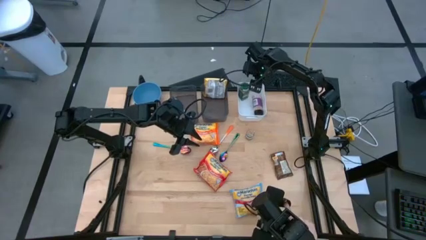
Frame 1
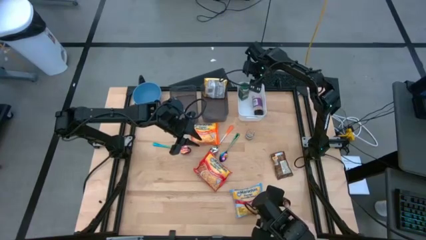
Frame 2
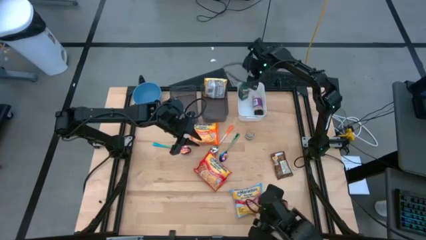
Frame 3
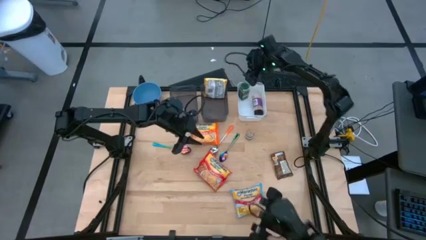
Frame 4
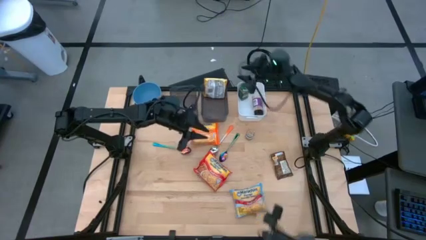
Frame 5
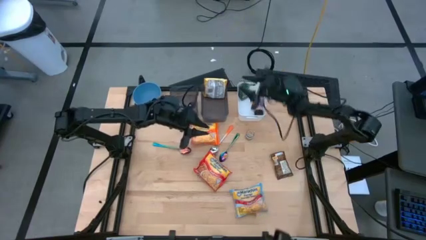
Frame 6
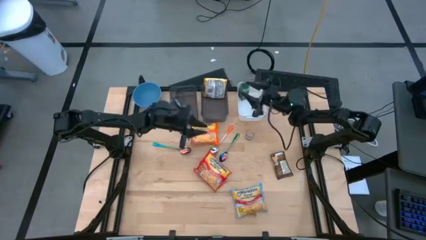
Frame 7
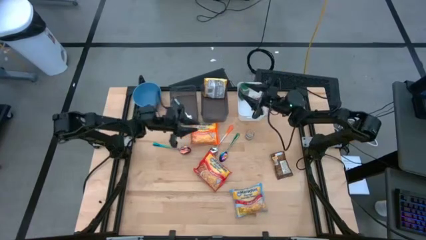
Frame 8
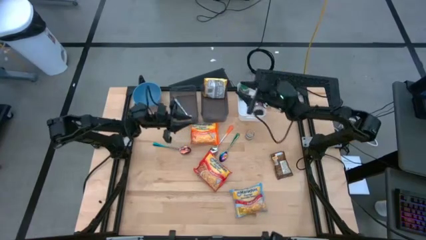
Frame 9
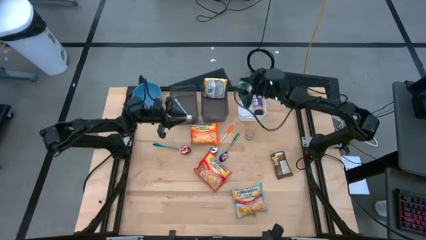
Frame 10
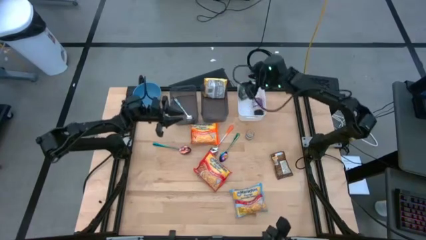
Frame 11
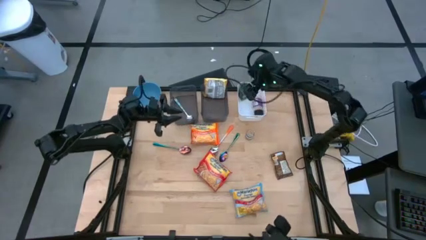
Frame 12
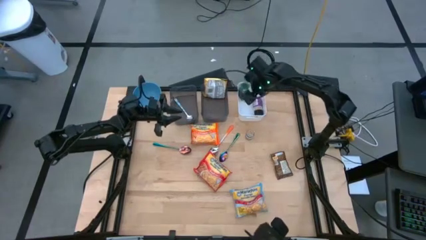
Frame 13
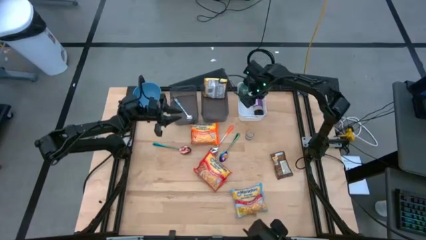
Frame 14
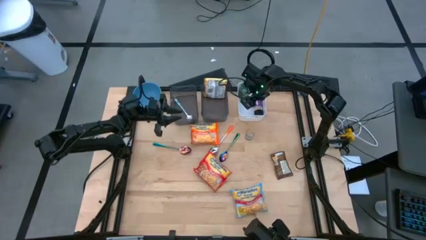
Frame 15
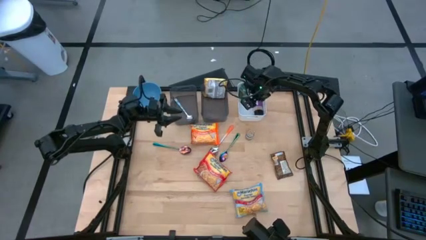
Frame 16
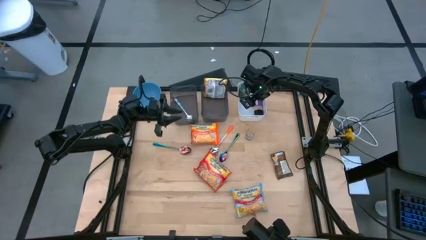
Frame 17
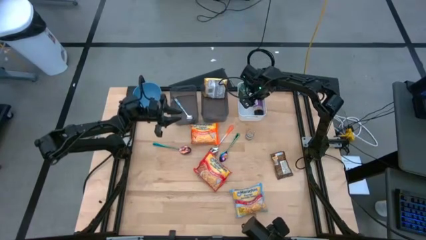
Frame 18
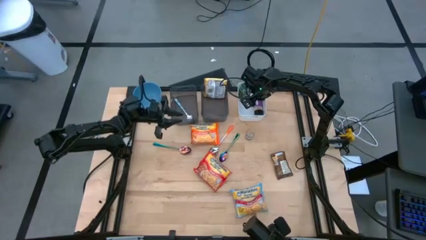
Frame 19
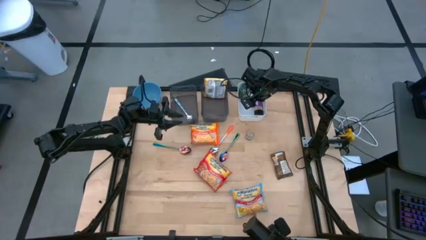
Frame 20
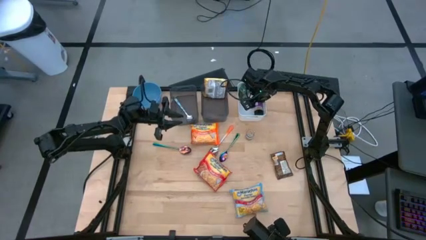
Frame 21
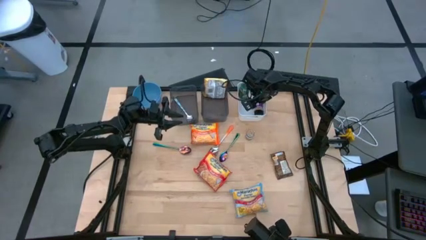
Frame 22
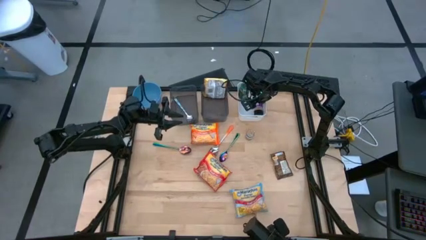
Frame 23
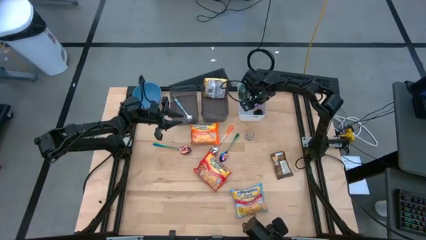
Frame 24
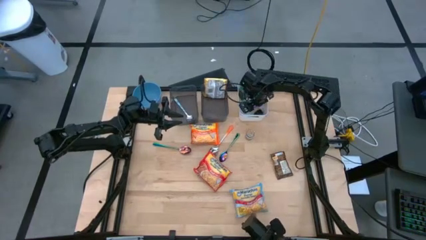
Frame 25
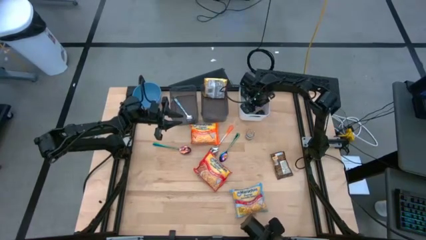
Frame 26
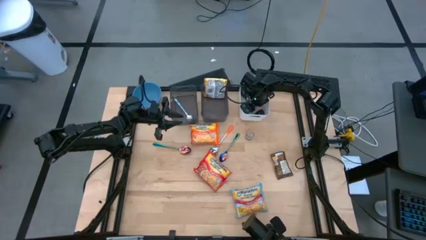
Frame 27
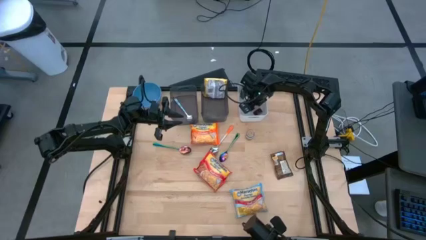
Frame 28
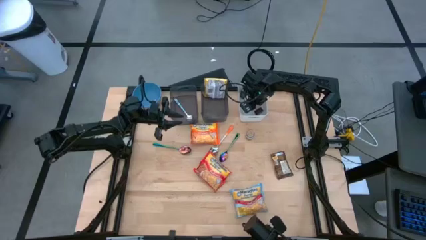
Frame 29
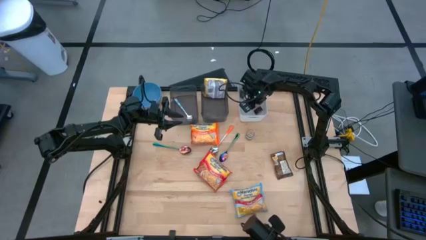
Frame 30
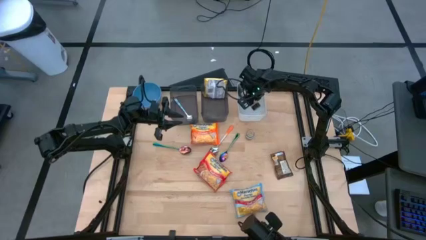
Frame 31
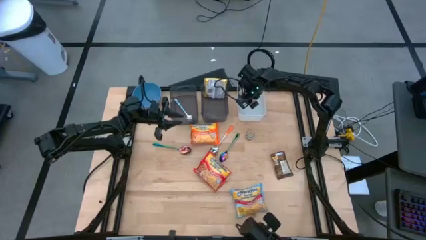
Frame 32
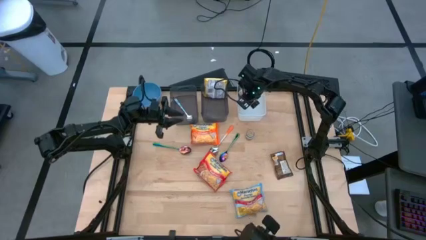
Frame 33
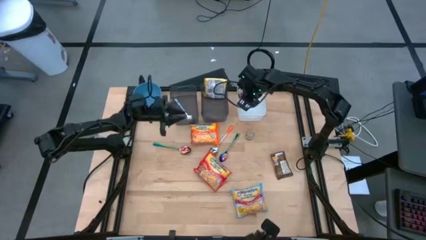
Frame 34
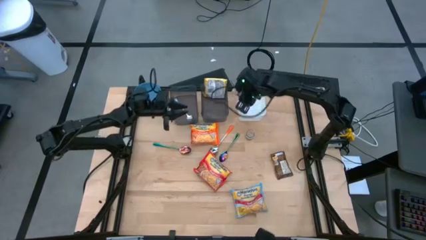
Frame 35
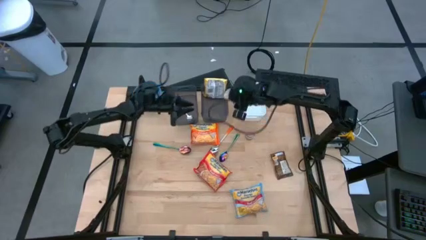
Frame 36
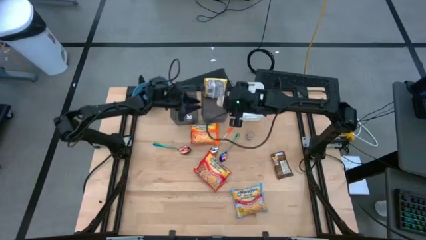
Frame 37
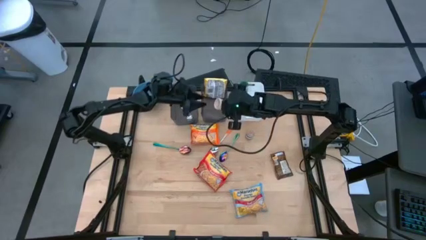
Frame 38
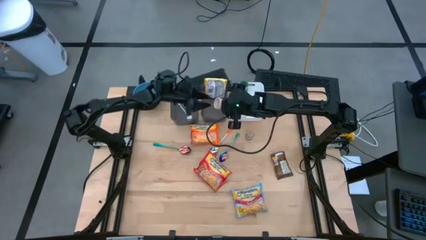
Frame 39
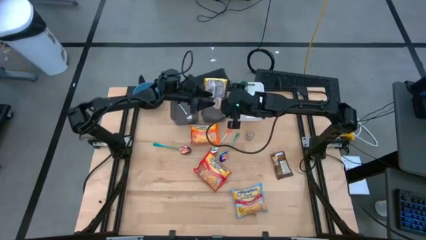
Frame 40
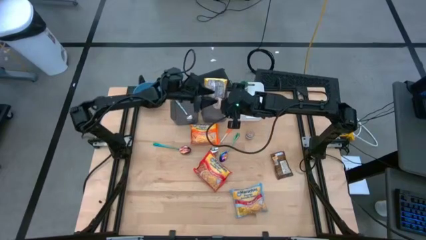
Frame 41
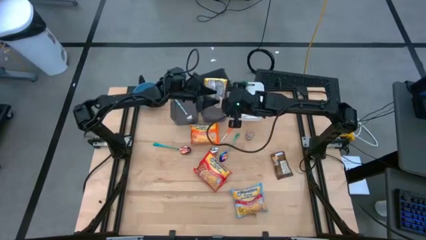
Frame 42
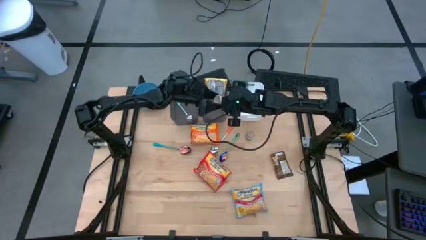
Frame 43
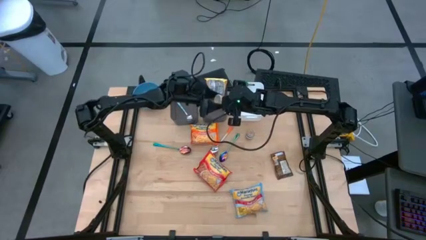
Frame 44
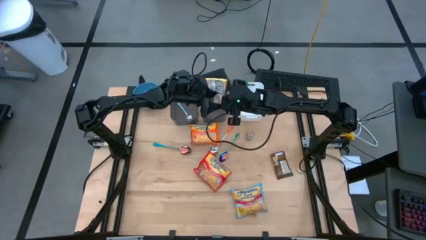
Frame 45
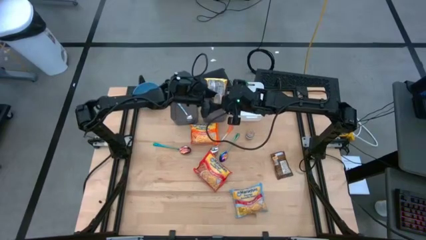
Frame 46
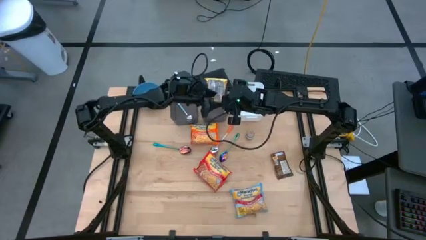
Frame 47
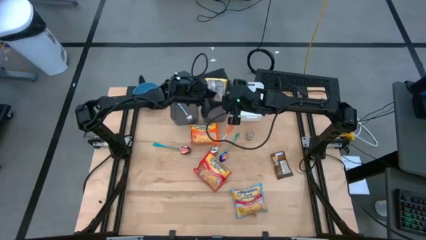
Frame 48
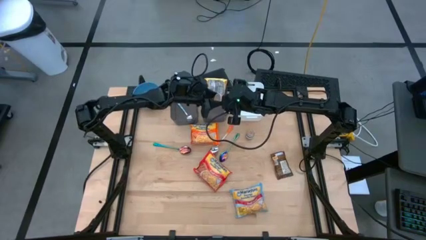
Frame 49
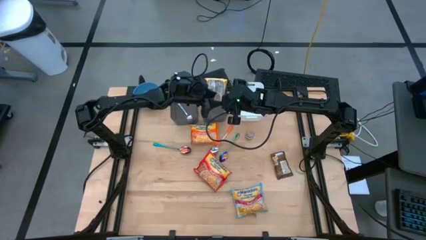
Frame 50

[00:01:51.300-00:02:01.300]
Task: Pick & Place Food Item
Put the purple seasoning bottle into the white bin

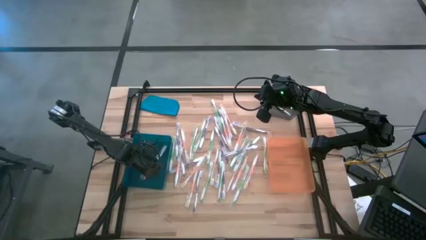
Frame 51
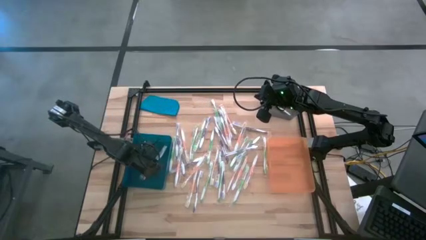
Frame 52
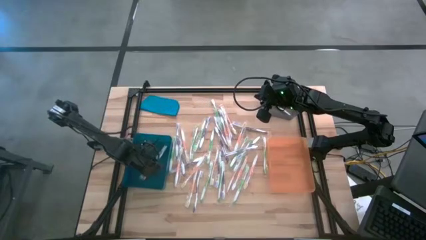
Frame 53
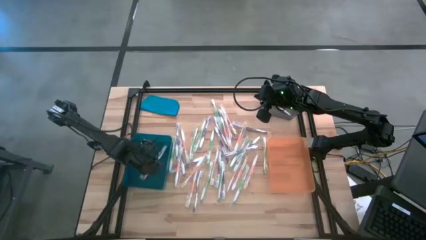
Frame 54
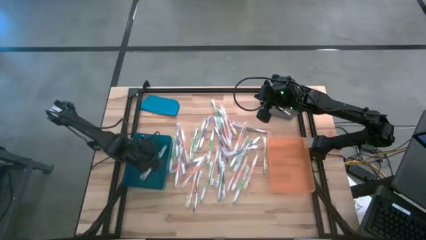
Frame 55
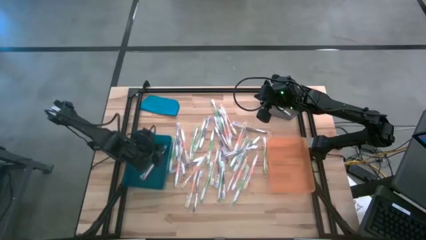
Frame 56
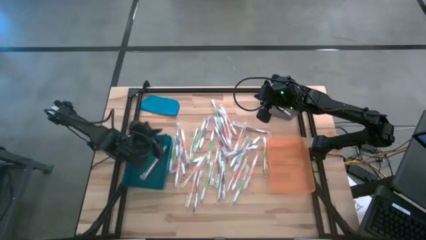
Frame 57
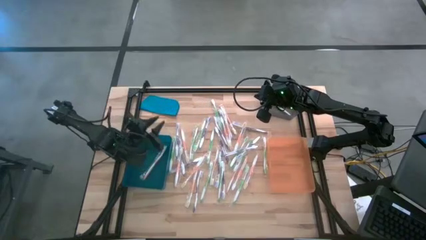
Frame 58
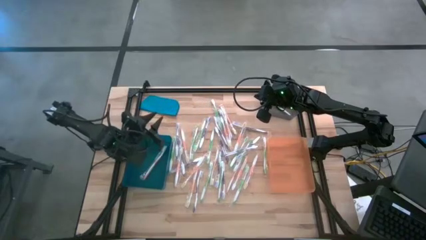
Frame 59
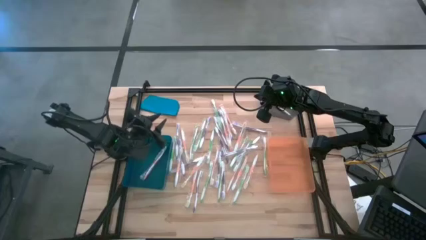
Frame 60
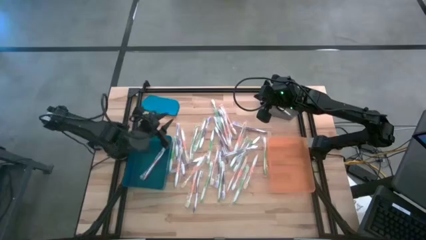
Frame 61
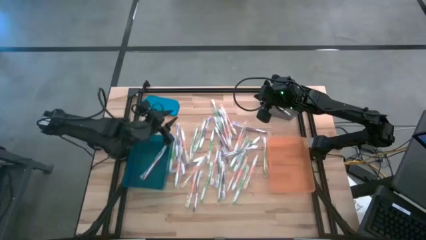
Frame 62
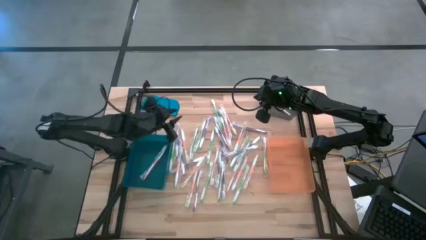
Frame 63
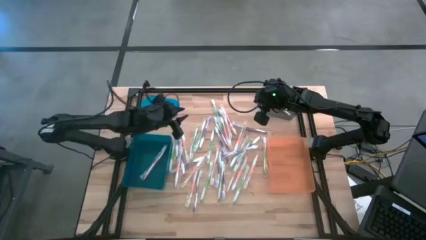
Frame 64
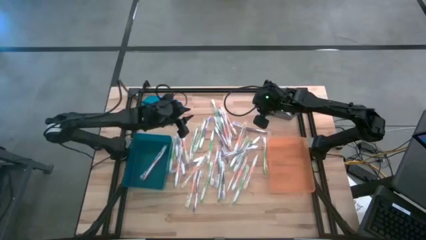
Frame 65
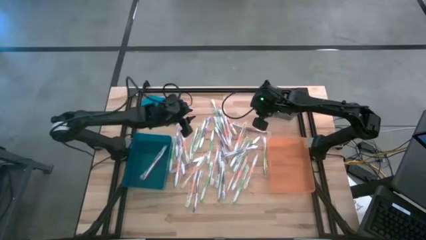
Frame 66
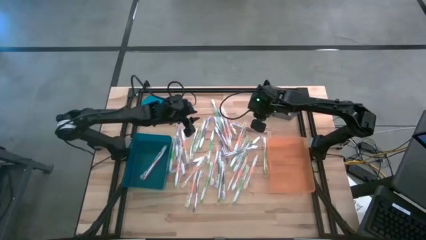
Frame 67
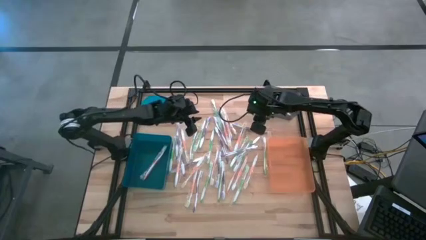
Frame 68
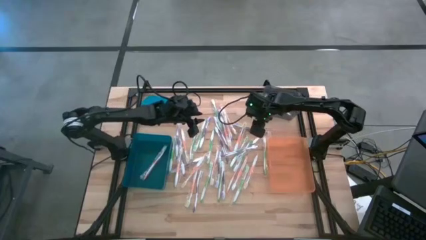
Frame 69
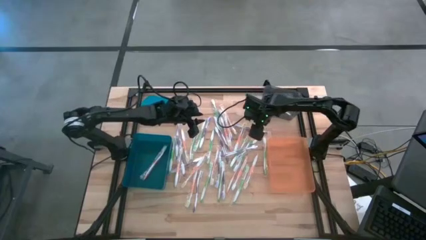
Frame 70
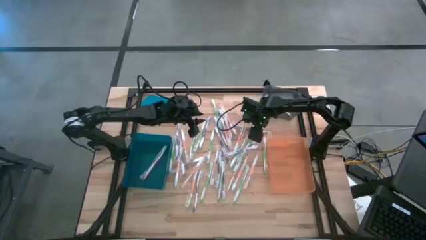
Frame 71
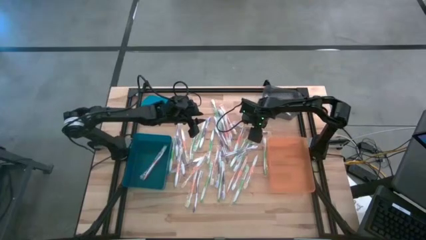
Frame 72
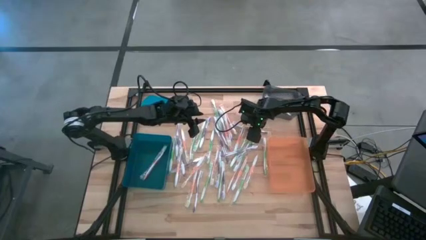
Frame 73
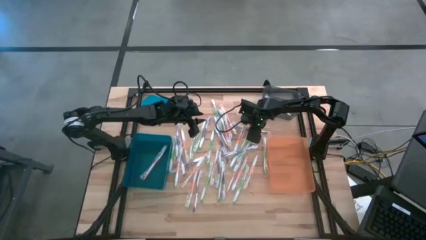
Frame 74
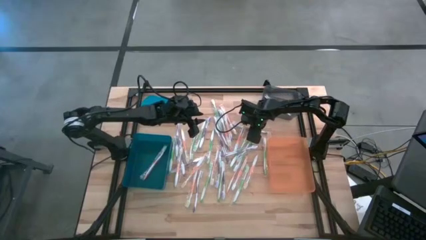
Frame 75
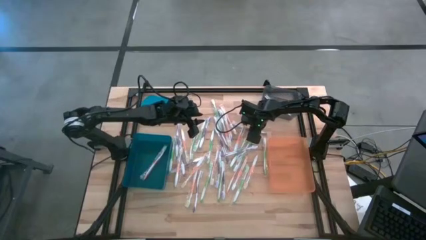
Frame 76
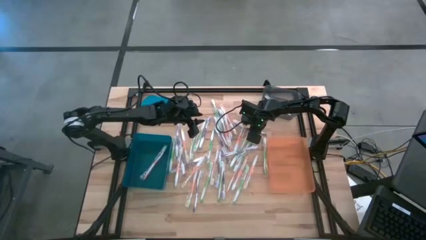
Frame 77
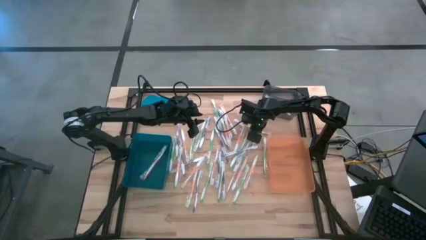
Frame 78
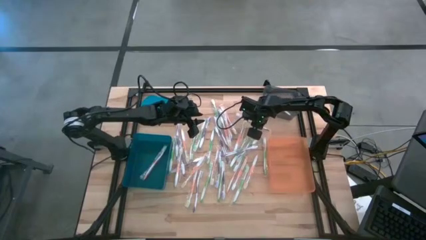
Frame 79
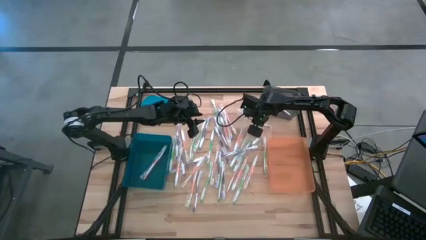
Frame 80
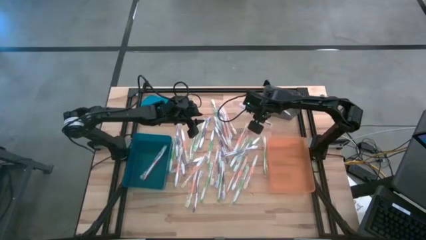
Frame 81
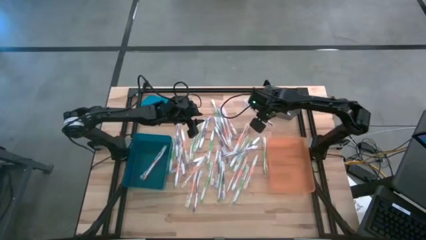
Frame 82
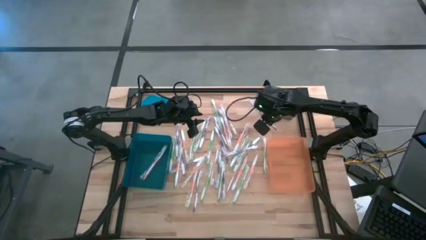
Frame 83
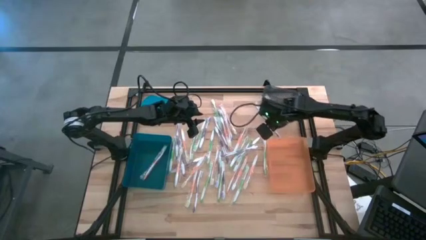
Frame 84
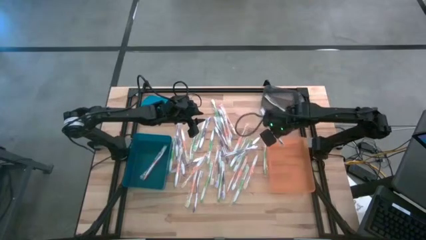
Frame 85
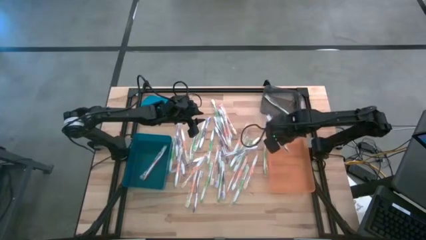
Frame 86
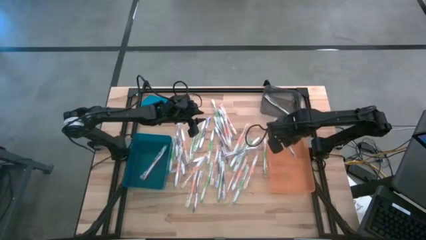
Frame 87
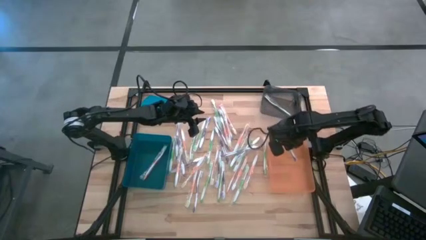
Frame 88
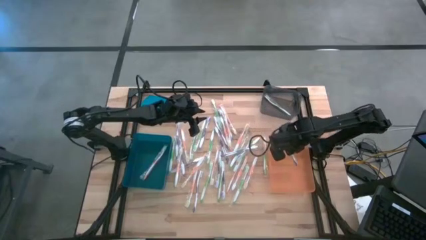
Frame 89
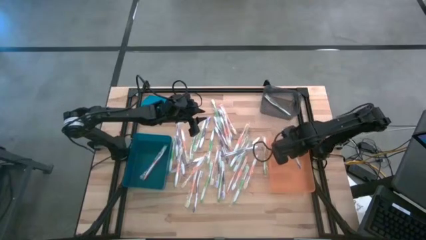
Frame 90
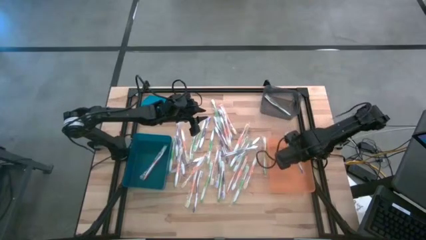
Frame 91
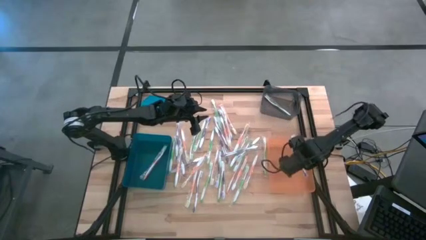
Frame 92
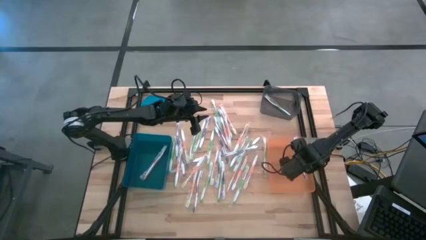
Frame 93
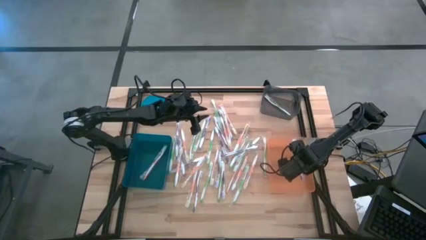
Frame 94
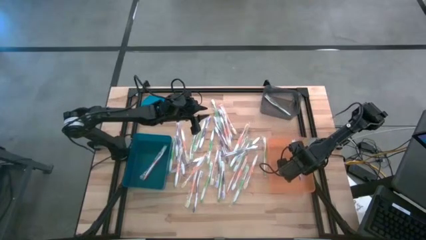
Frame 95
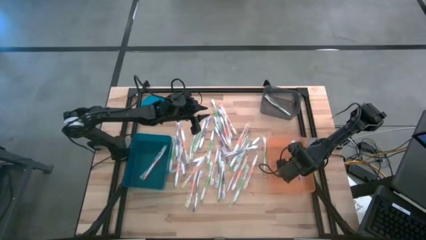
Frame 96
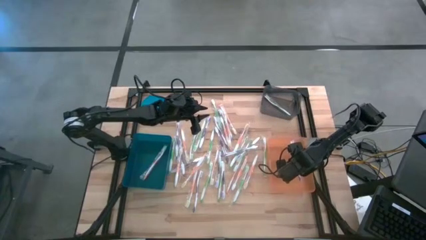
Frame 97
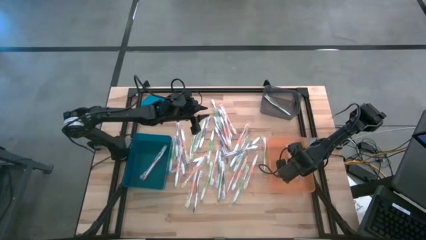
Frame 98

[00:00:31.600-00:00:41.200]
Task: Pick & Place Toothbrushes
Put the purple toothbrush into the orange bin
